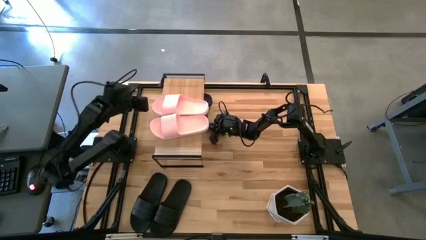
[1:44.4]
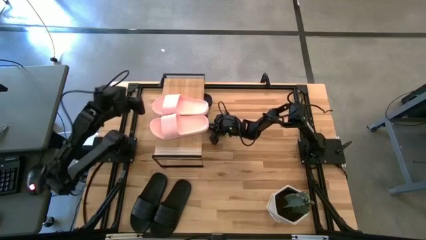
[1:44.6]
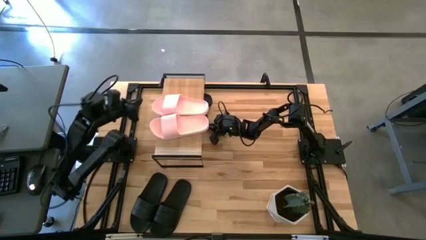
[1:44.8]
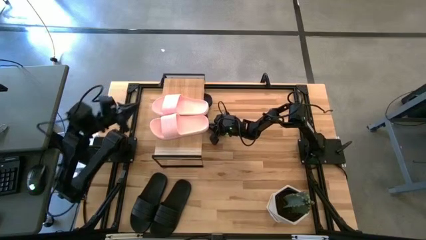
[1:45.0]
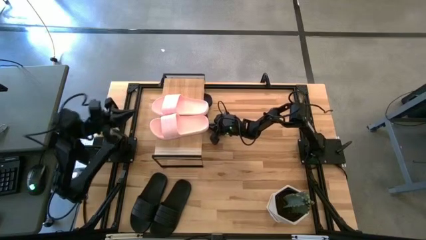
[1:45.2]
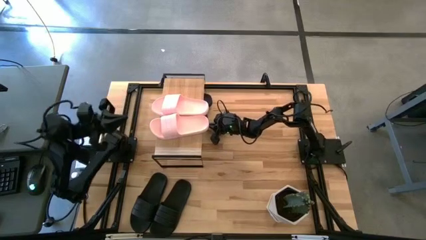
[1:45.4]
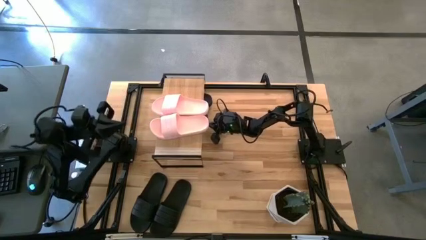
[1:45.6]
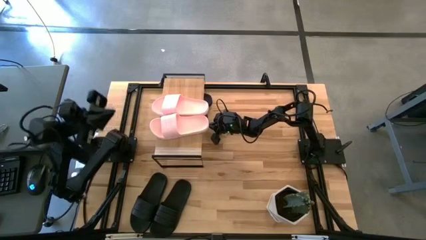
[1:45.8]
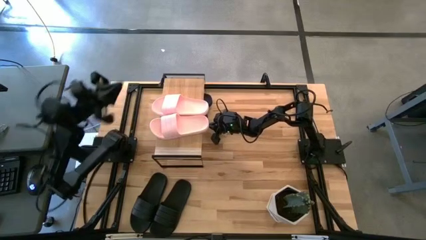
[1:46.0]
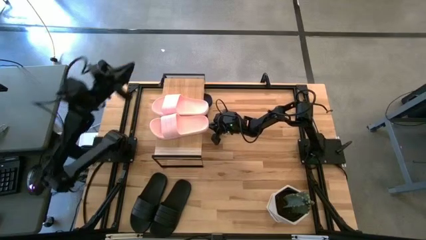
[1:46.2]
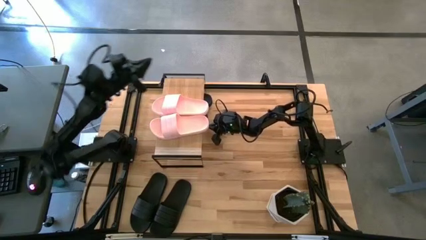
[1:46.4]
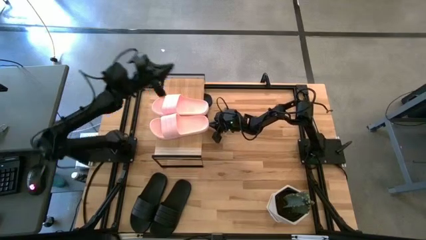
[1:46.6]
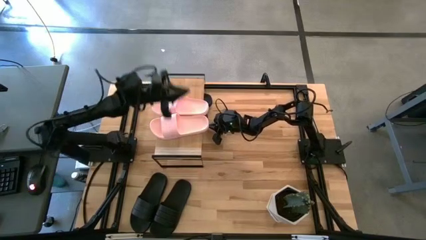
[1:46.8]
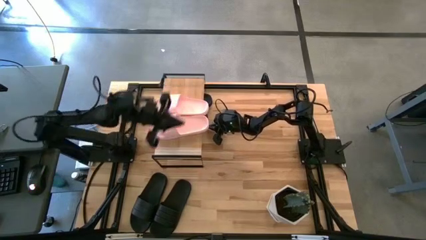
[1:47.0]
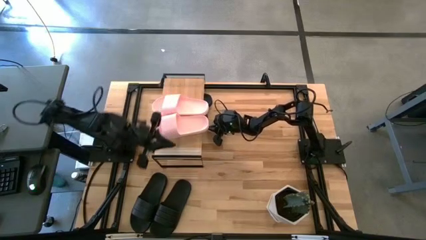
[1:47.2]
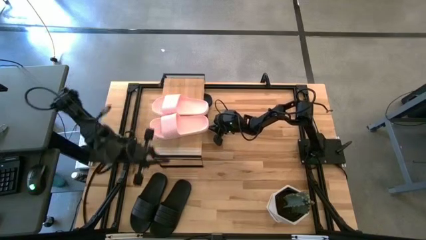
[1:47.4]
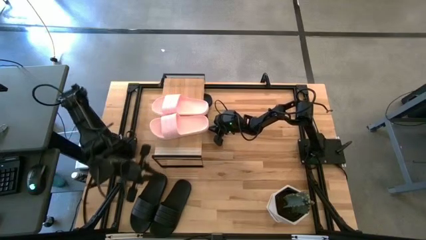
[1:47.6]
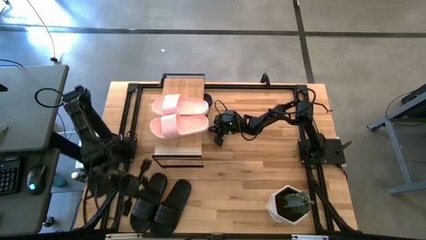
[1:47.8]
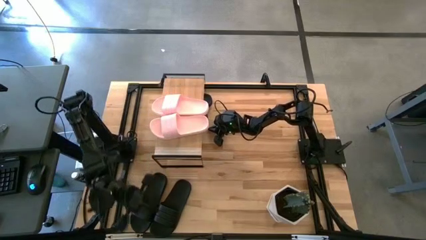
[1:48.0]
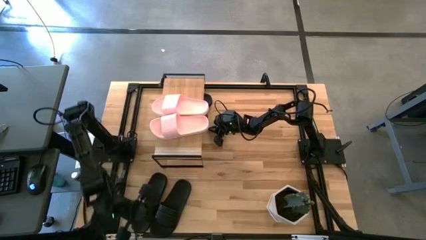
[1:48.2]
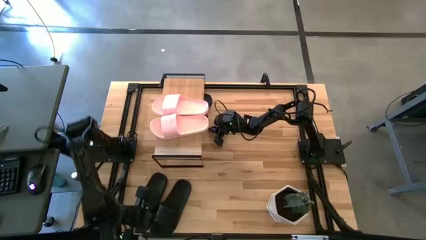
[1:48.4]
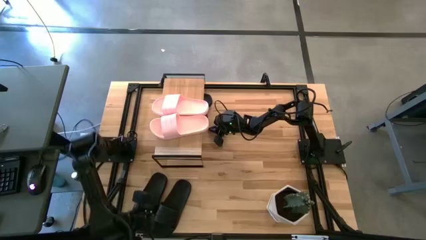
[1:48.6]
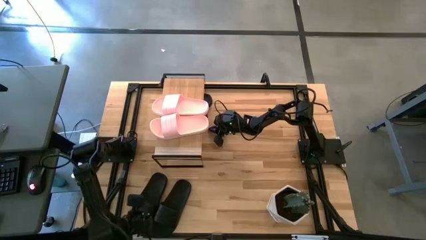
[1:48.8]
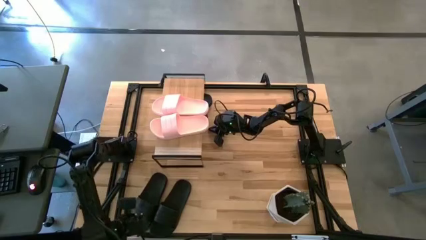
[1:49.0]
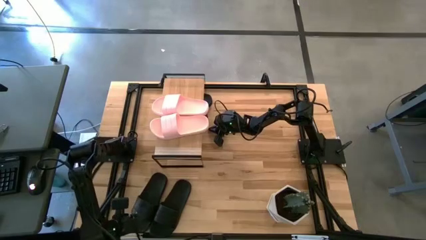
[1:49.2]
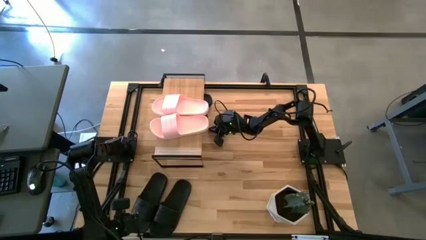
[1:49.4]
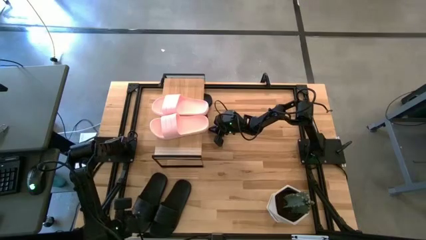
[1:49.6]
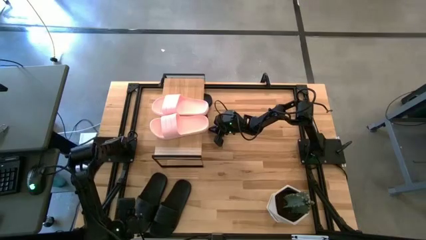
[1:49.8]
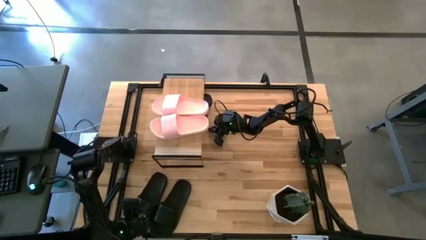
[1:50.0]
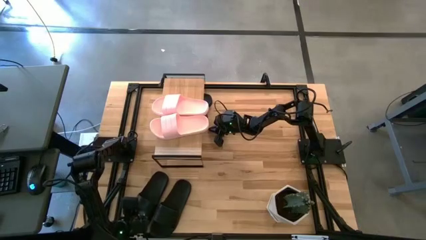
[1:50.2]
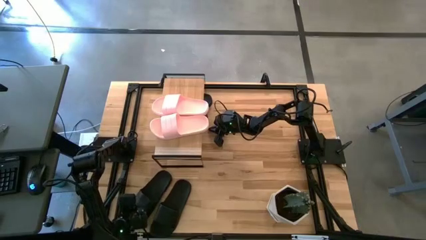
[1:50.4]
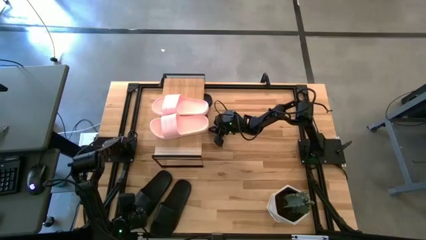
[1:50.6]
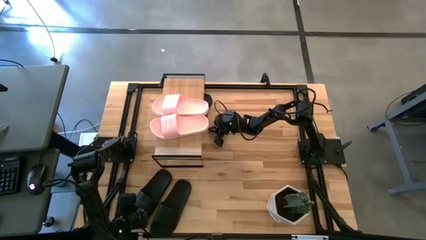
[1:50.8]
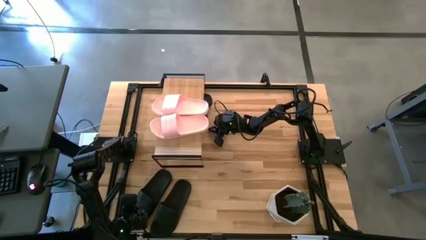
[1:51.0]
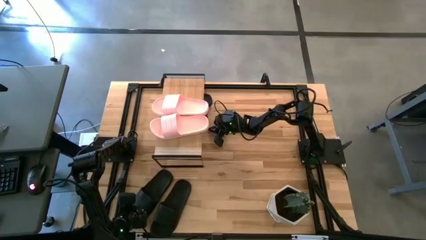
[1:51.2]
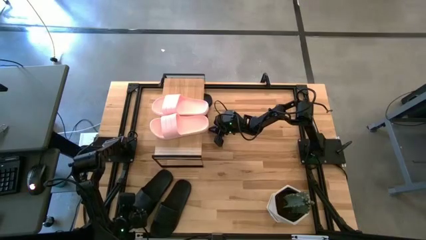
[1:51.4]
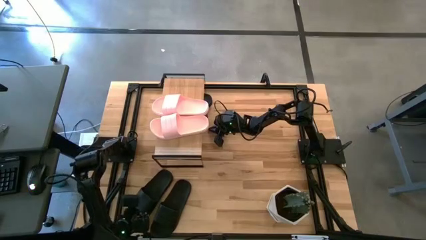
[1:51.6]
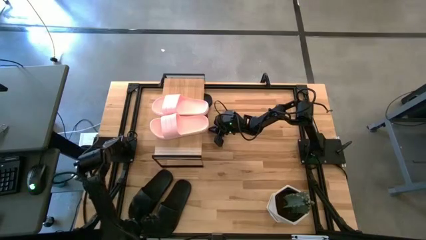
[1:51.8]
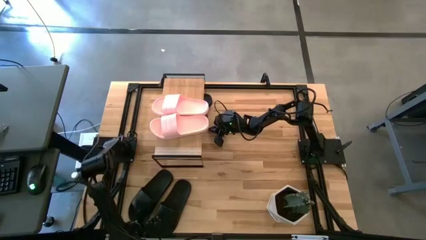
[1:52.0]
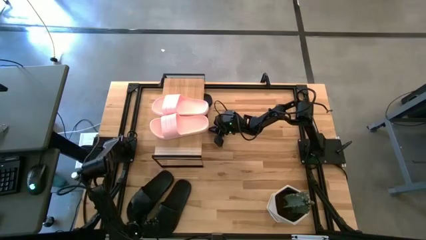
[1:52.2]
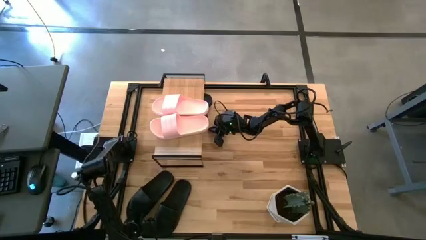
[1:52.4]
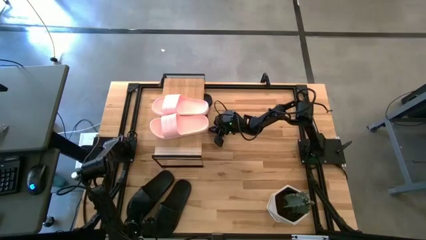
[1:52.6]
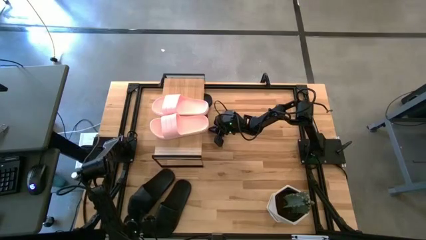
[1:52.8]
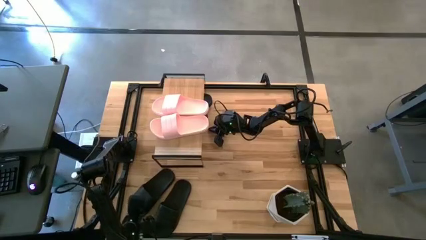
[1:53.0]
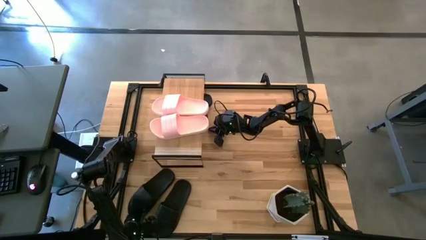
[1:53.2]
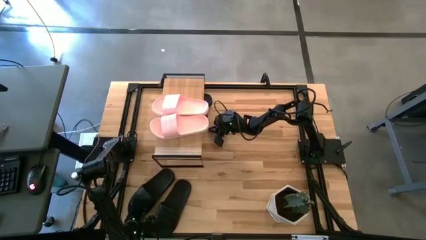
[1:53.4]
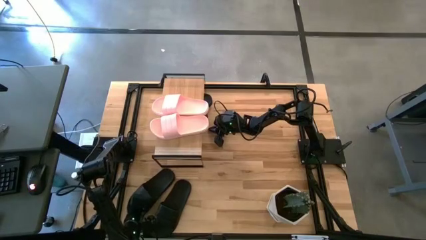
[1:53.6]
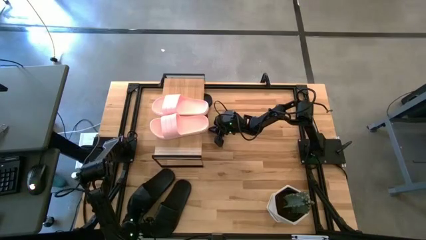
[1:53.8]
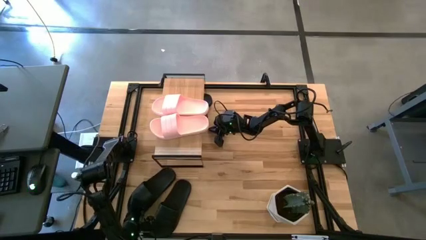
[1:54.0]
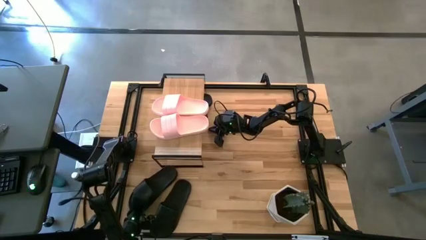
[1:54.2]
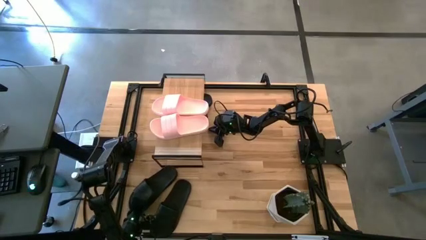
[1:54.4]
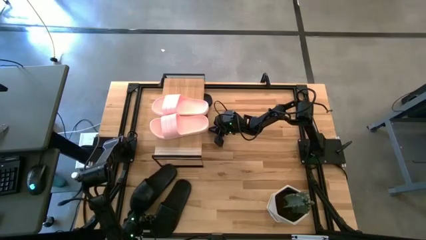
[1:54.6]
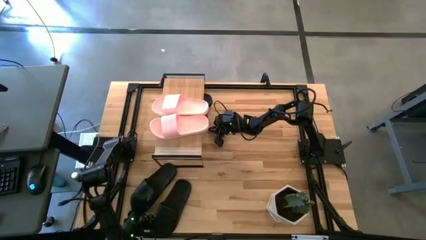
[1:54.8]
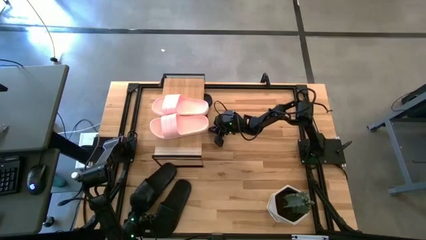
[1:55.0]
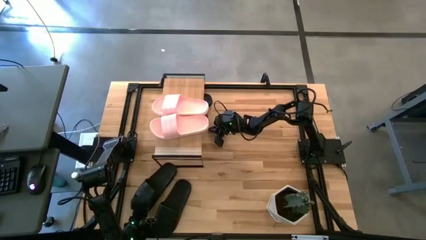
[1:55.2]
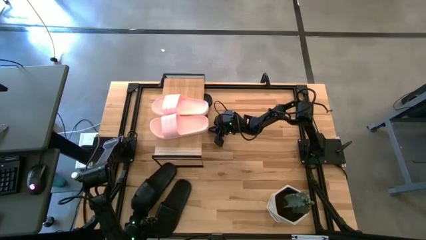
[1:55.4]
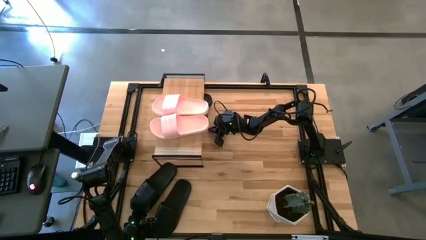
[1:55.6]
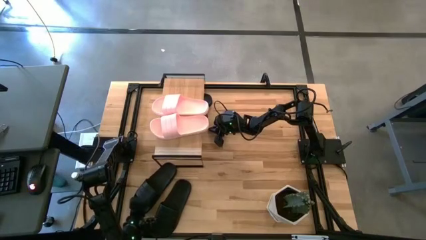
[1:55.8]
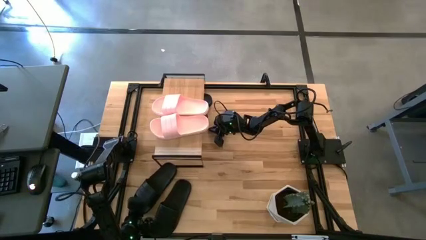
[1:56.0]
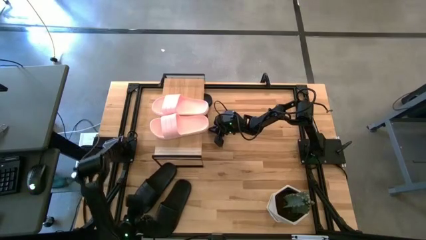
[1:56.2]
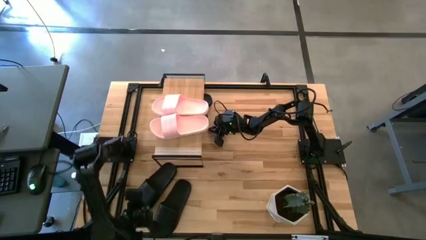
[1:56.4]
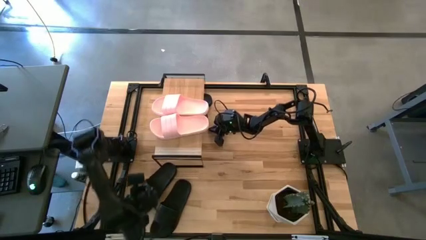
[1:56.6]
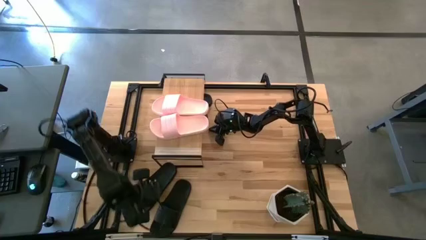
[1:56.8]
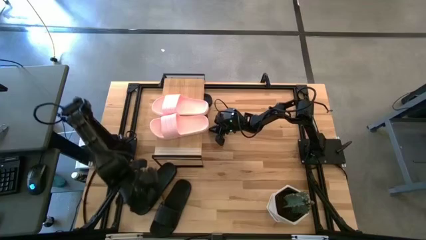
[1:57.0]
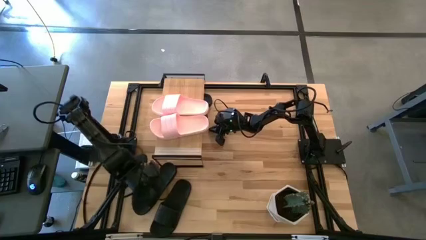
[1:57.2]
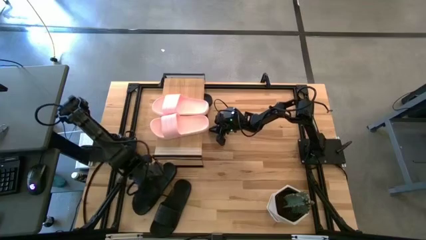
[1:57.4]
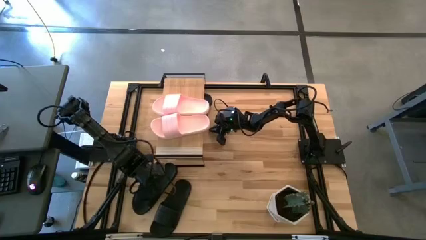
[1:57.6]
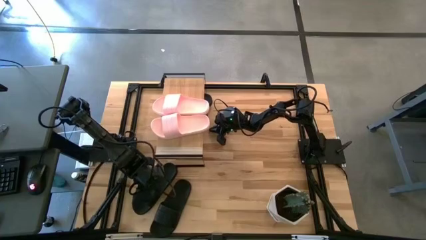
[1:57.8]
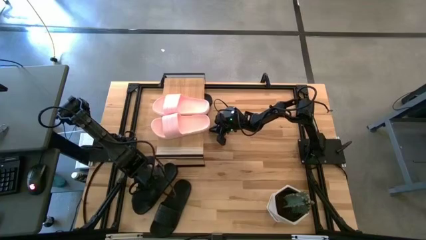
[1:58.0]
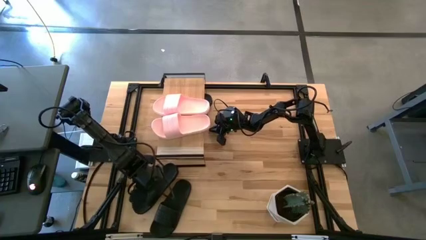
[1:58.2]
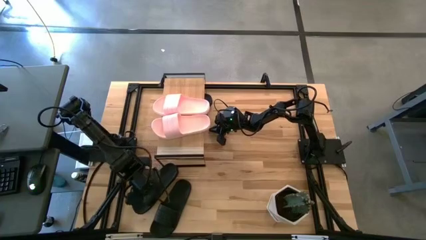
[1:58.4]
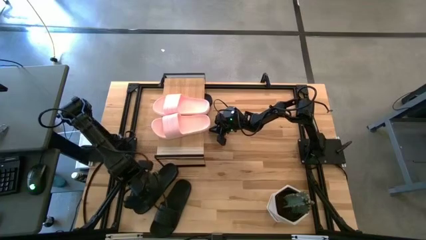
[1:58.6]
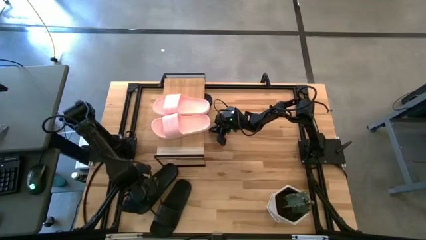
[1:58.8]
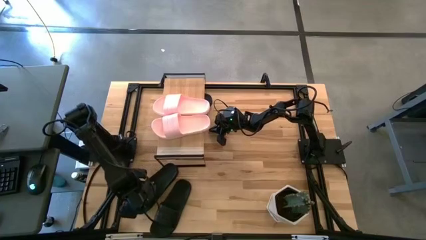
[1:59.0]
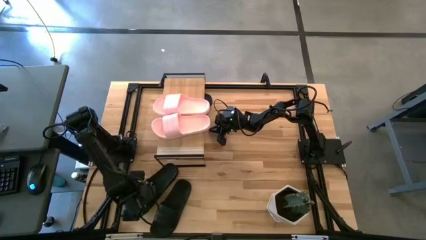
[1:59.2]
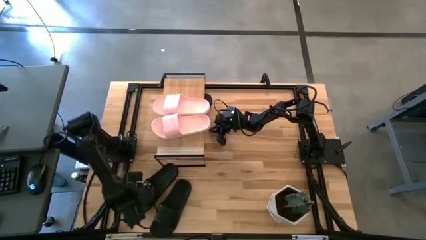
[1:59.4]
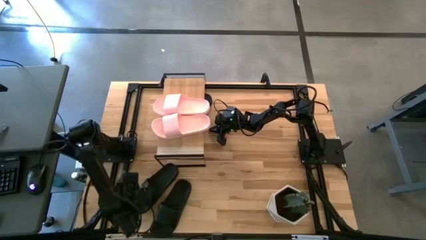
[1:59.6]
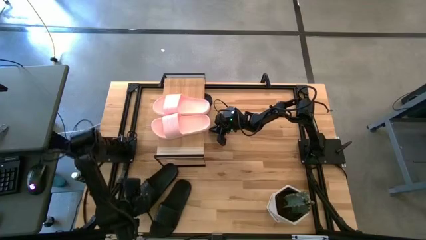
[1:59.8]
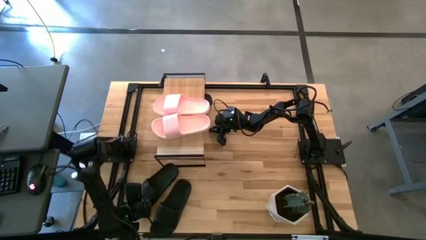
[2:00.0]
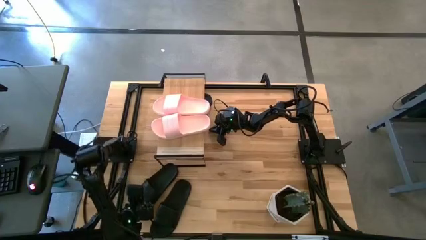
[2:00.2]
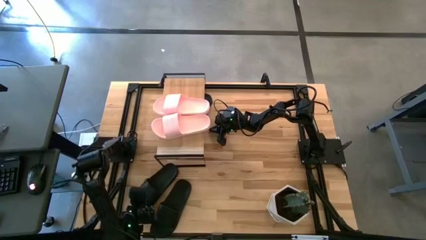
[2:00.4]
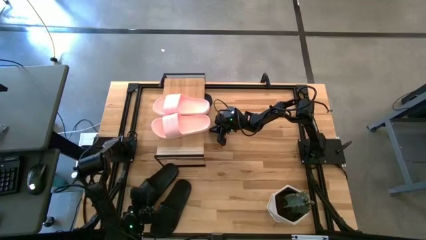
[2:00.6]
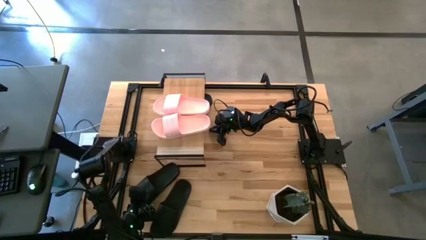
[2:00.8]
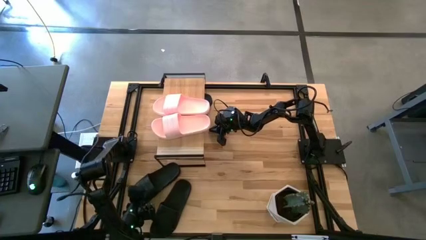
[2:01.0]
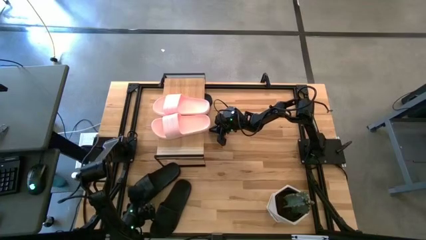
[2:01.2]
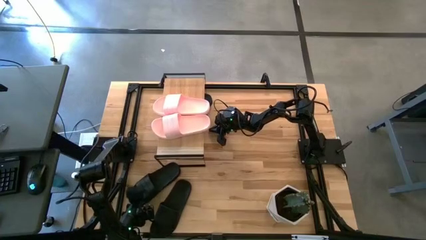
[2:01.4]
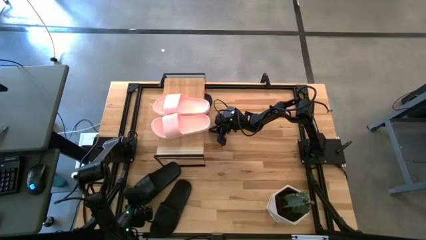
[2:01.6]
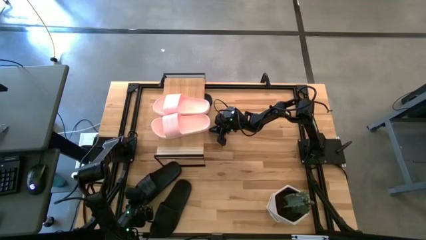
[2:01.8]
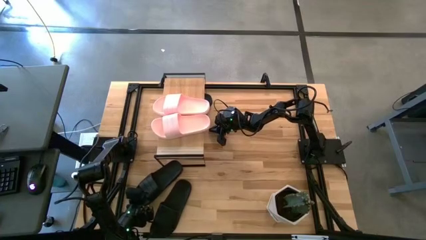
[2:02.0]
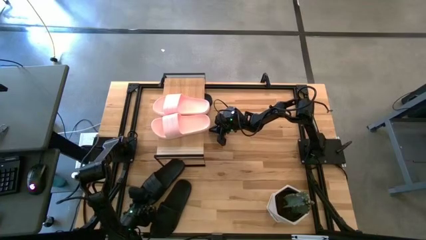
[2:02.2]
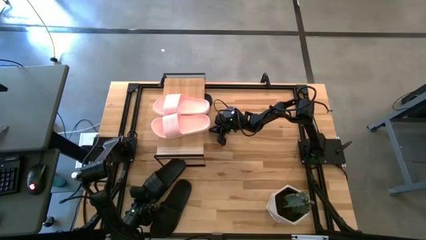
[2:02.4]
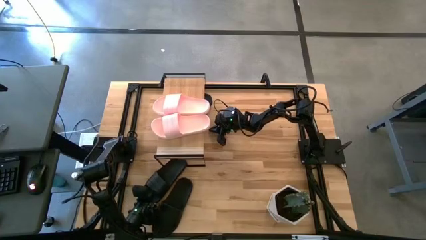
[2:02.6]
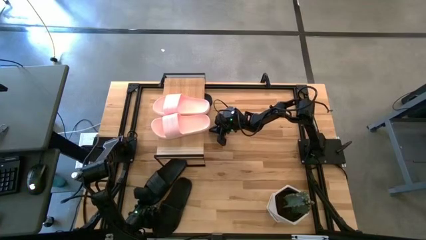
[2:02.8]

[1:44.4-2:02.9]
Task: Pick and place slides into the shelf
Put the black slide under the shelf
